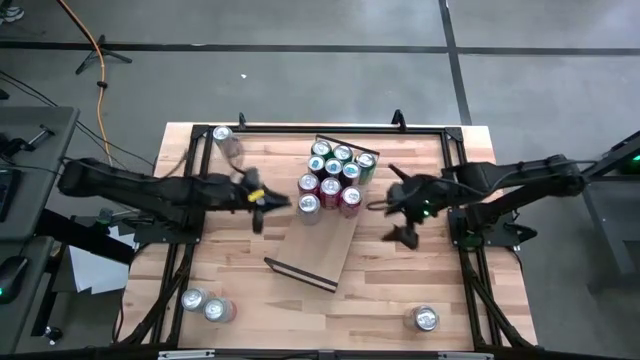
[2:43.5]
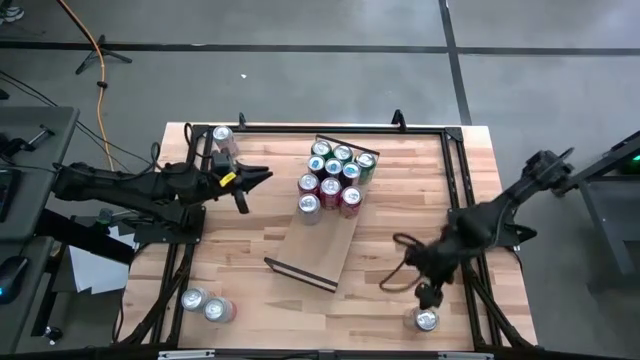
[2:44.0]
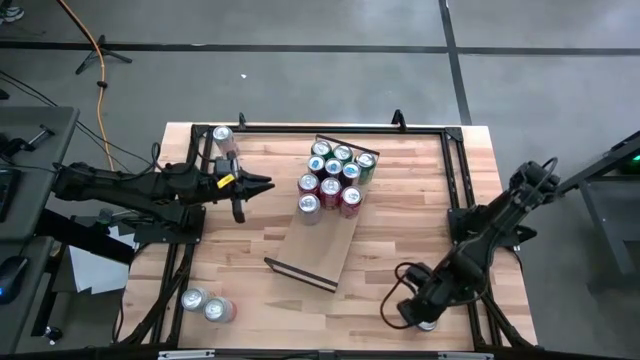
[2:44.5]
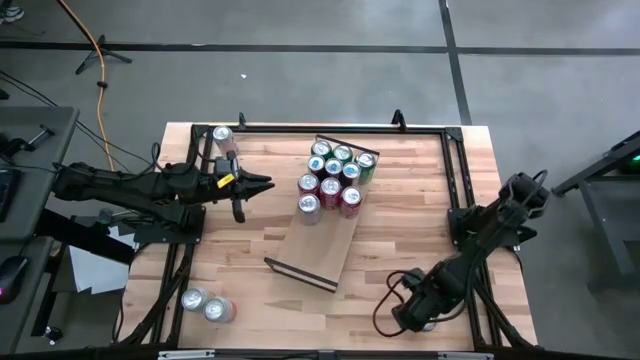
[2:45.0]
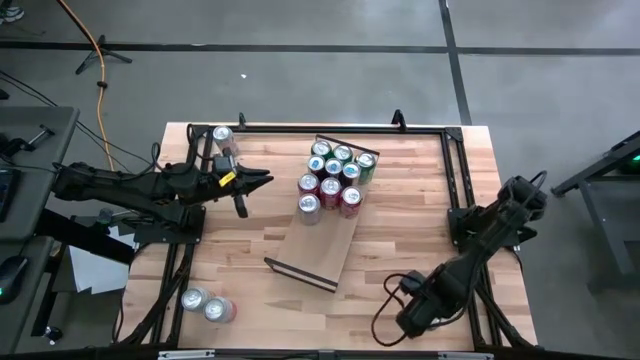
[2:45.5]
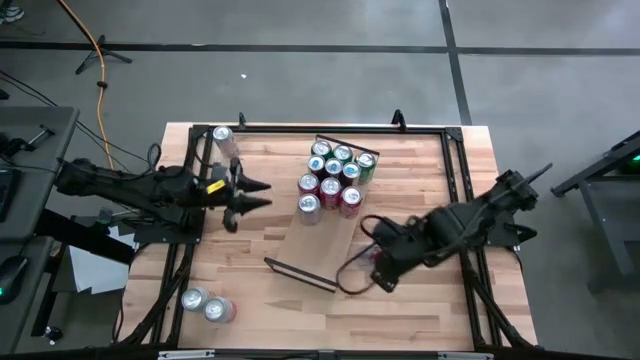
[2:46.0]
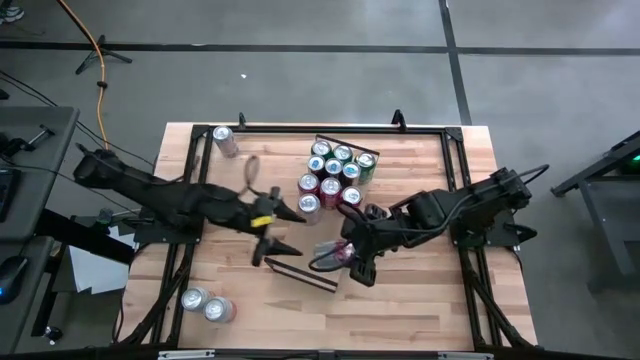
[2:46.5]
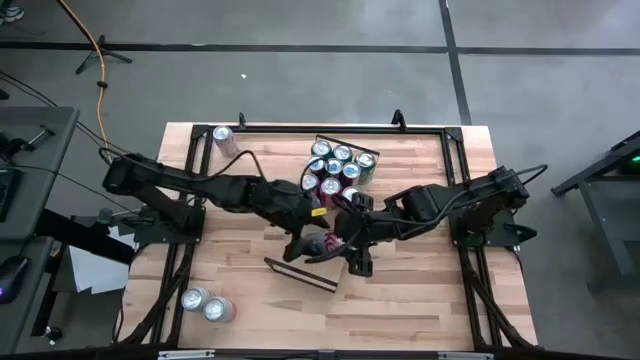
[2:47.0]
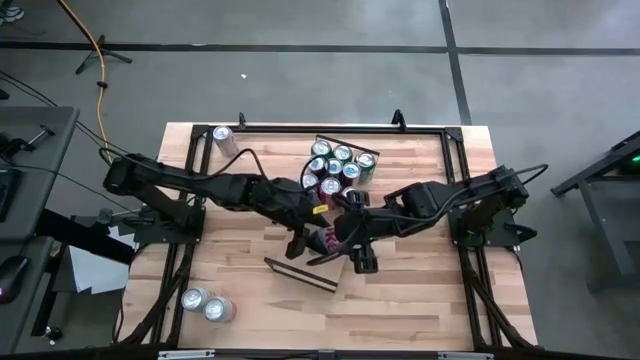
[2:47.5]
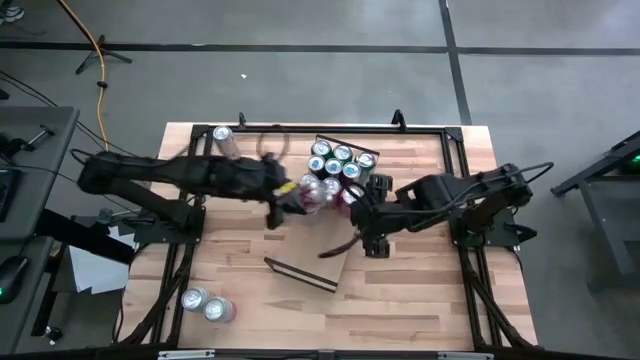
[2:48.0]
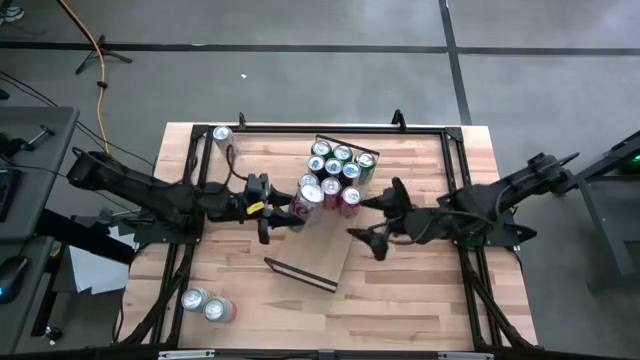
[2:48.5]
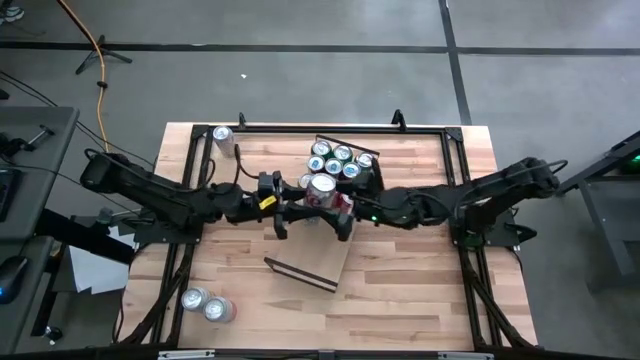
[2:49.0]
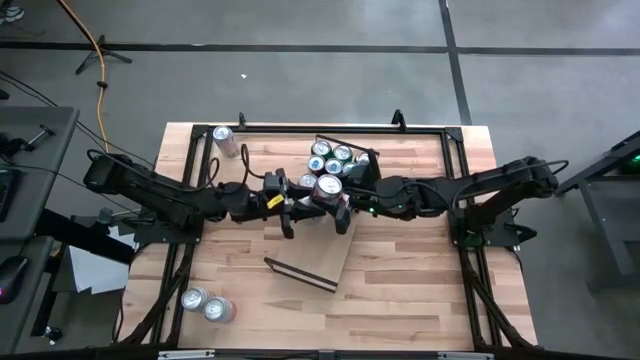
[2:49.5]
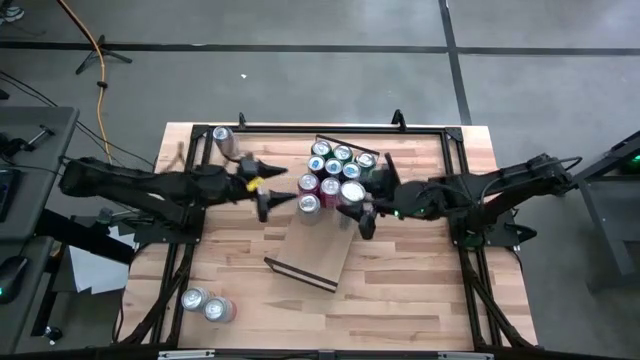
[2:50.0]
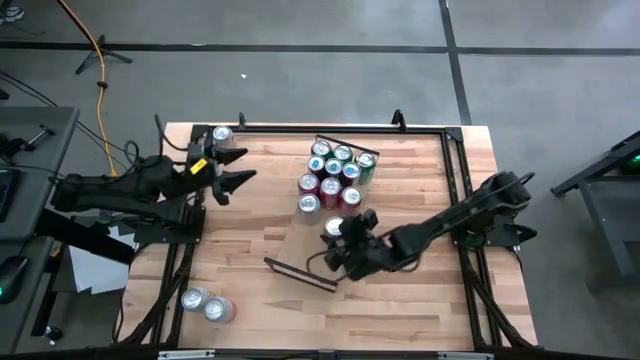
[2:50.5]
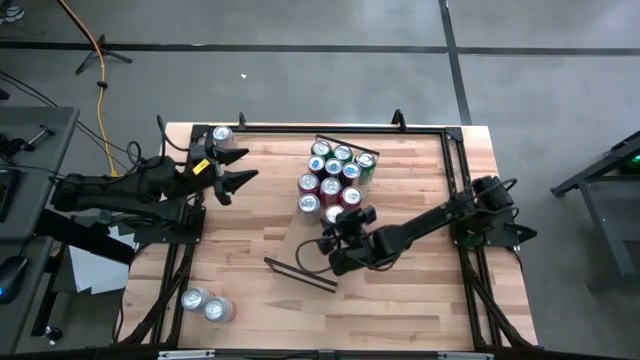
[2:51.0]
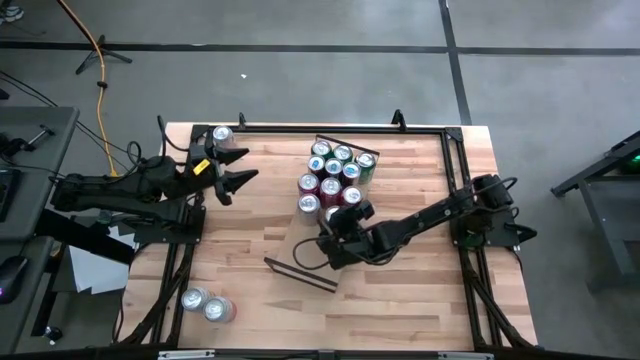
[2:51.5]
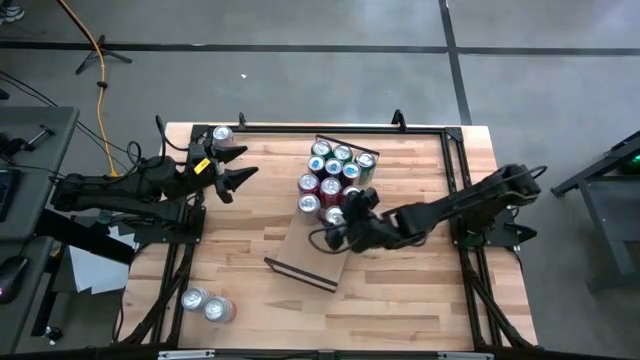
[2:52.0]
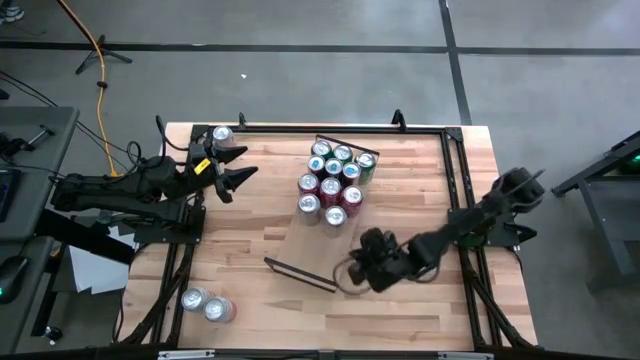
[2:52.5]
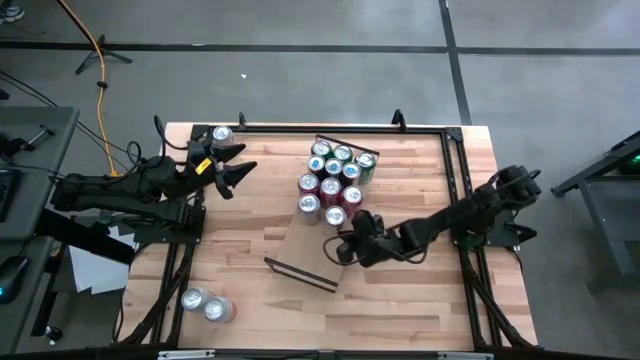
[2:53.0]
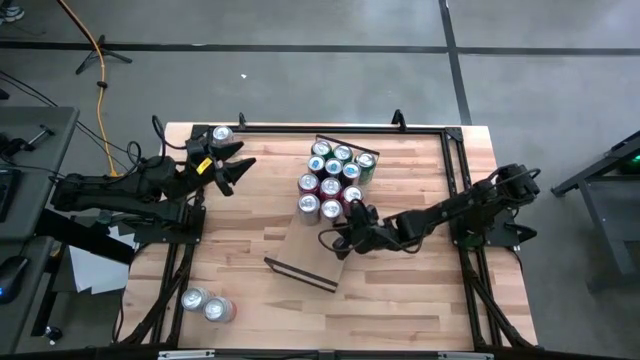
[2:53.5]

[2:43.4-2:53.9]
Task: Place canned beverage on shelf
Put the bottom red and silver soda can on the shelf aligned with the other red and silver soda can
